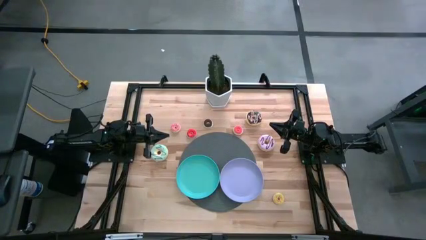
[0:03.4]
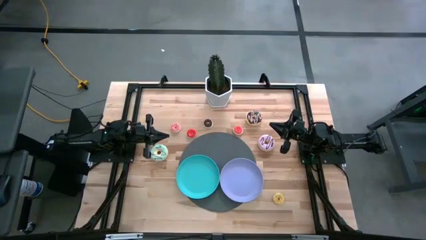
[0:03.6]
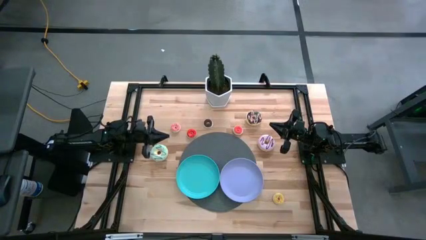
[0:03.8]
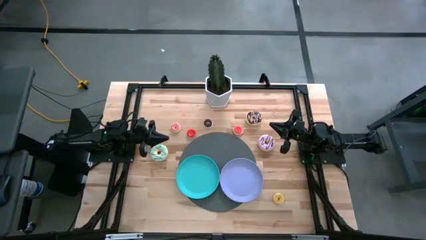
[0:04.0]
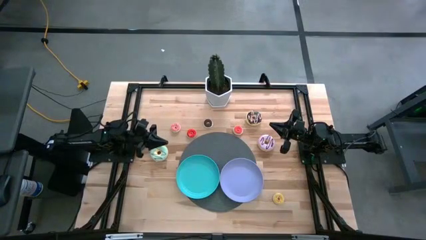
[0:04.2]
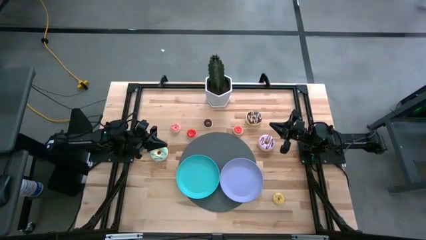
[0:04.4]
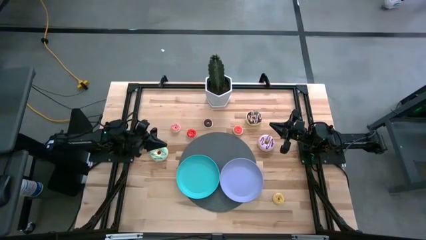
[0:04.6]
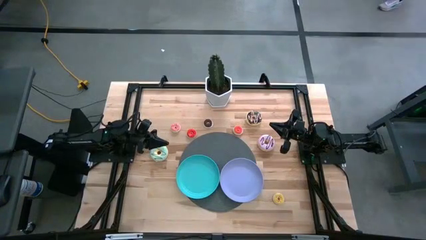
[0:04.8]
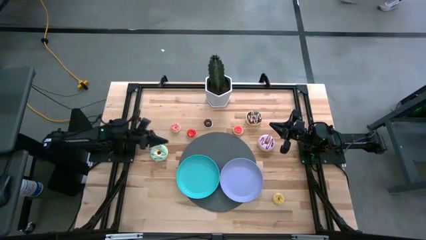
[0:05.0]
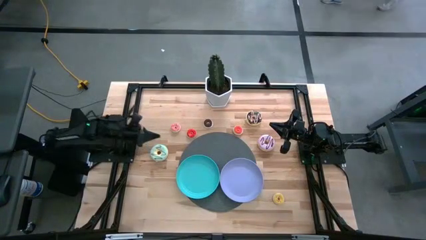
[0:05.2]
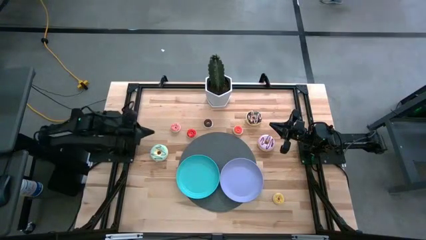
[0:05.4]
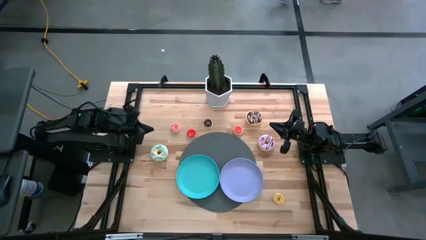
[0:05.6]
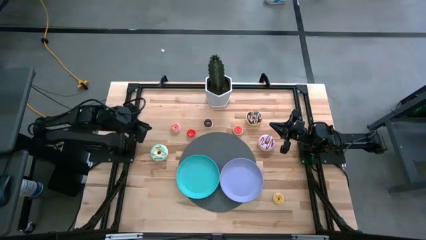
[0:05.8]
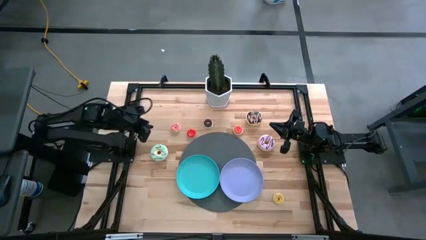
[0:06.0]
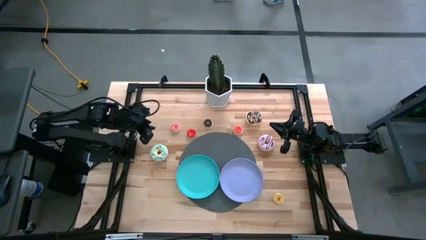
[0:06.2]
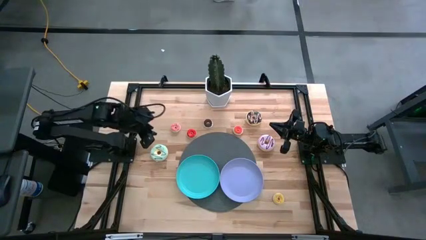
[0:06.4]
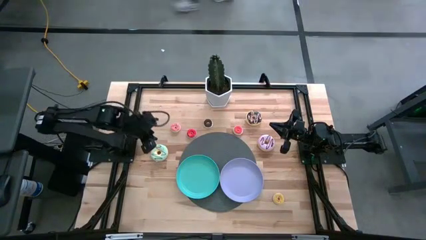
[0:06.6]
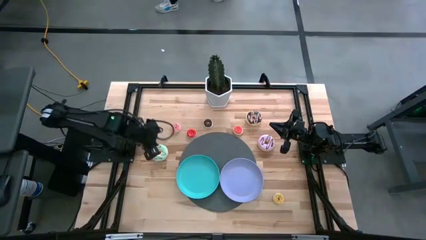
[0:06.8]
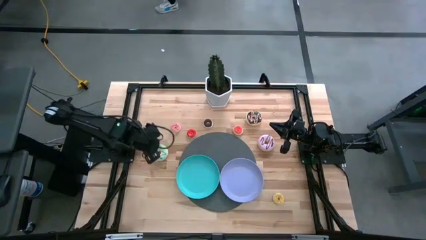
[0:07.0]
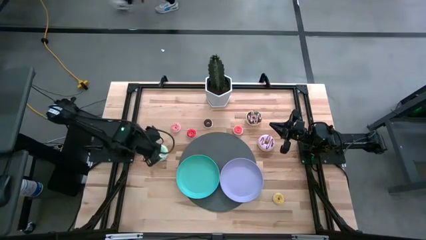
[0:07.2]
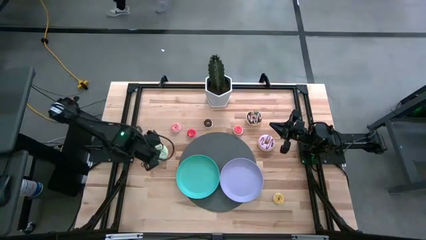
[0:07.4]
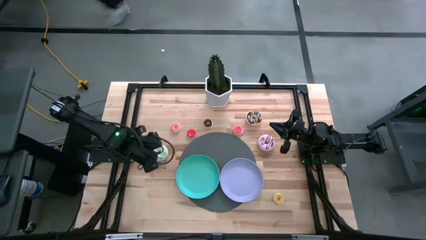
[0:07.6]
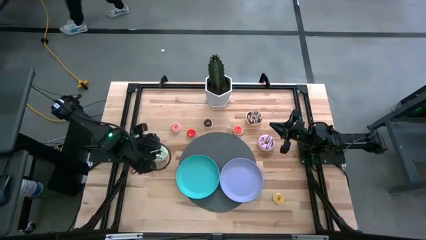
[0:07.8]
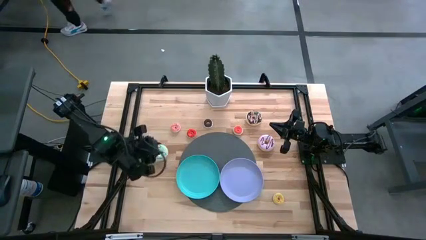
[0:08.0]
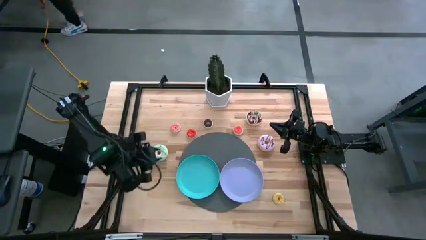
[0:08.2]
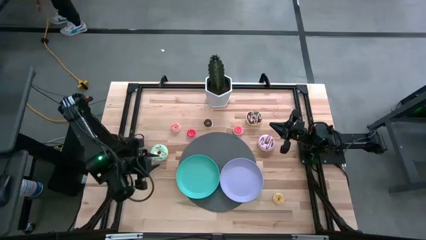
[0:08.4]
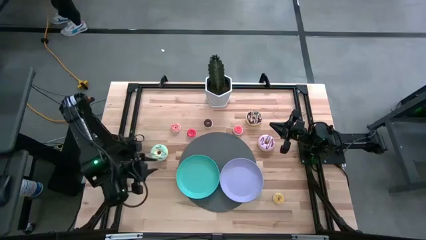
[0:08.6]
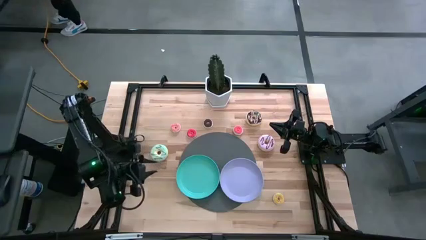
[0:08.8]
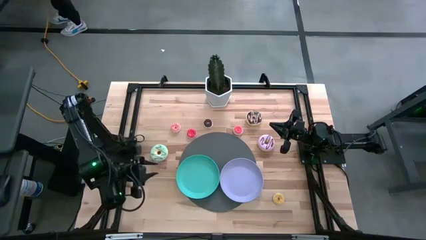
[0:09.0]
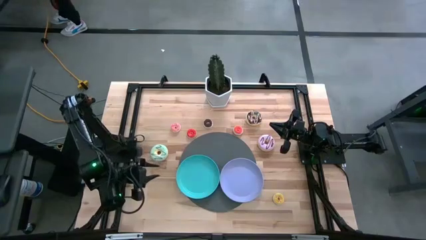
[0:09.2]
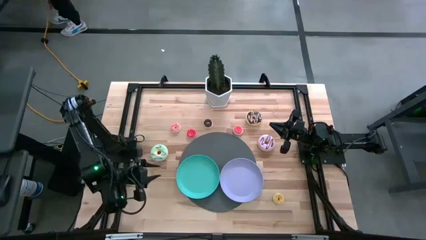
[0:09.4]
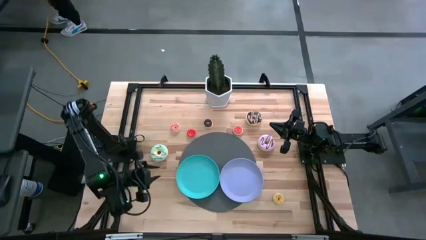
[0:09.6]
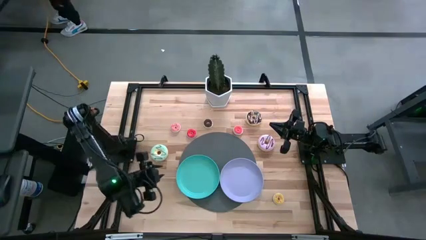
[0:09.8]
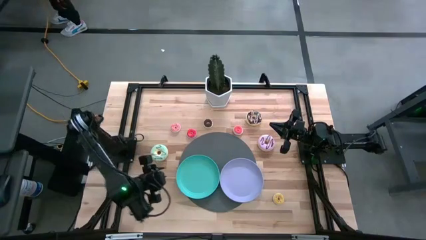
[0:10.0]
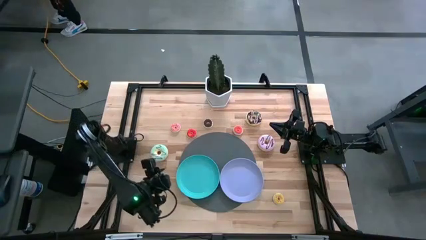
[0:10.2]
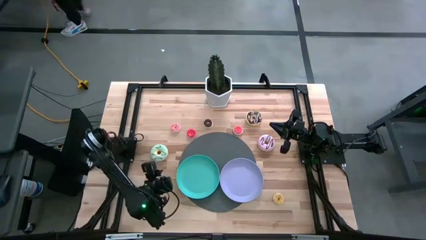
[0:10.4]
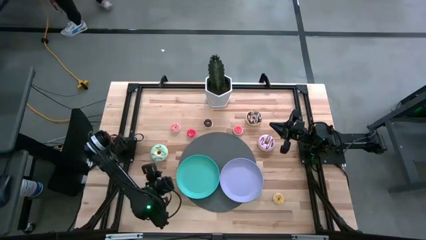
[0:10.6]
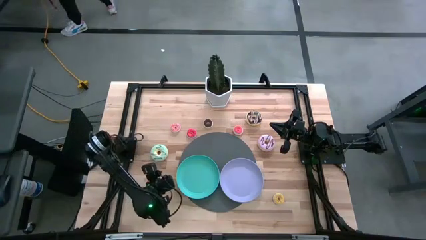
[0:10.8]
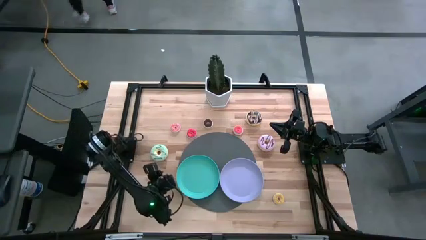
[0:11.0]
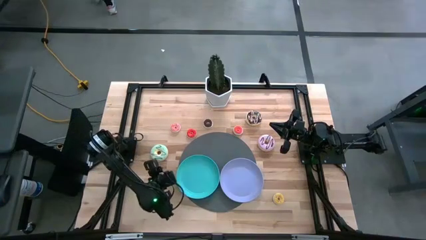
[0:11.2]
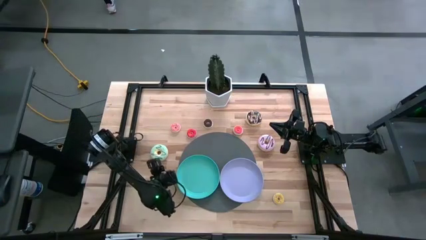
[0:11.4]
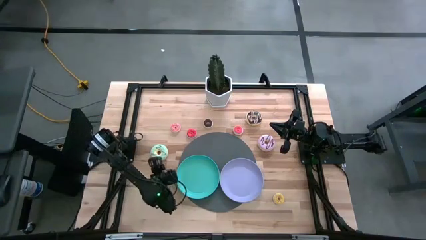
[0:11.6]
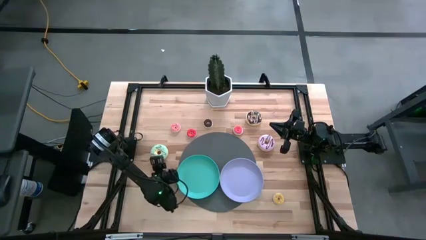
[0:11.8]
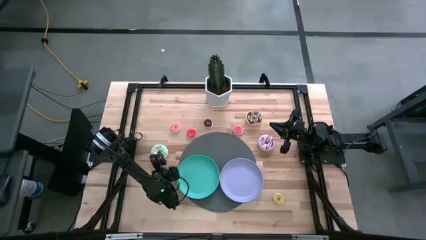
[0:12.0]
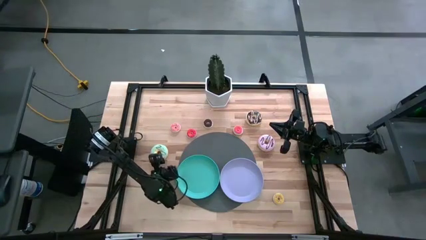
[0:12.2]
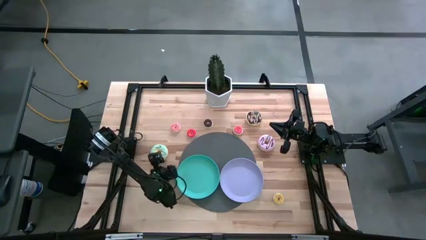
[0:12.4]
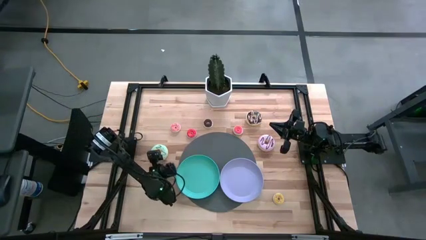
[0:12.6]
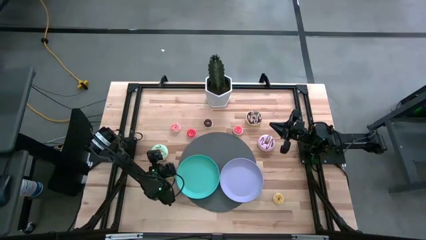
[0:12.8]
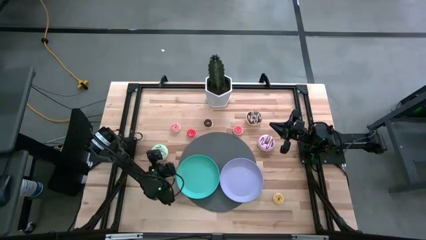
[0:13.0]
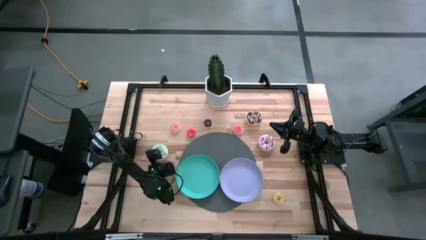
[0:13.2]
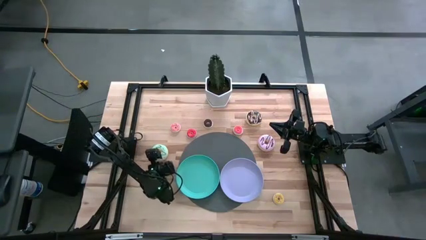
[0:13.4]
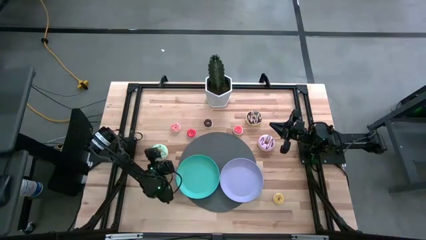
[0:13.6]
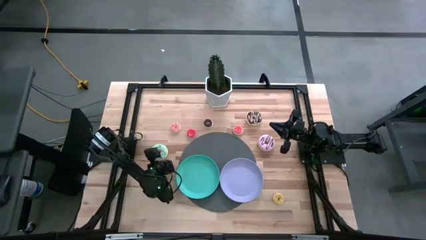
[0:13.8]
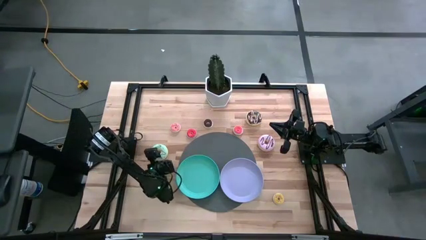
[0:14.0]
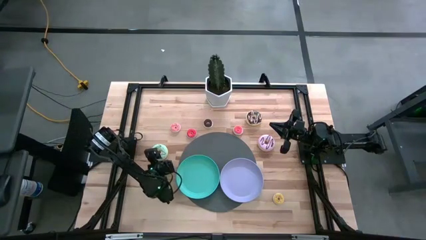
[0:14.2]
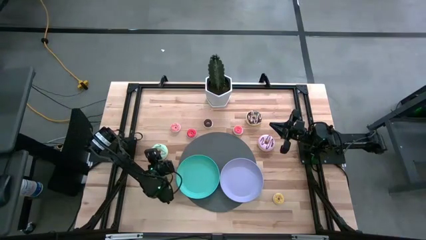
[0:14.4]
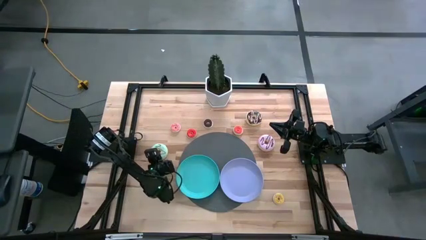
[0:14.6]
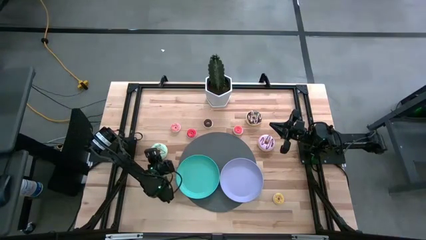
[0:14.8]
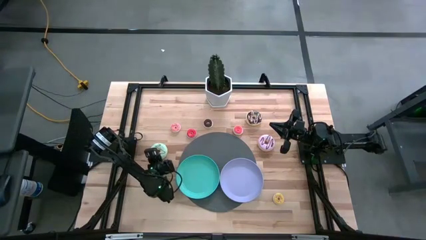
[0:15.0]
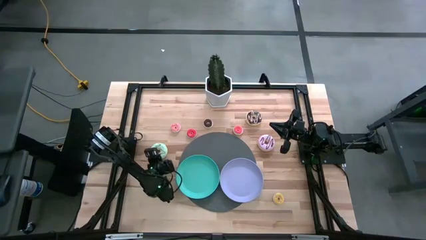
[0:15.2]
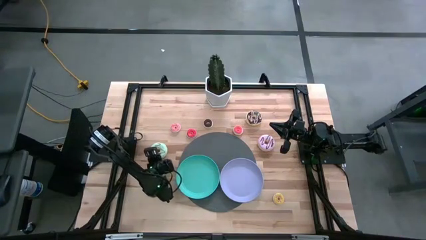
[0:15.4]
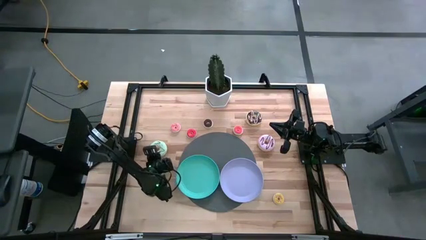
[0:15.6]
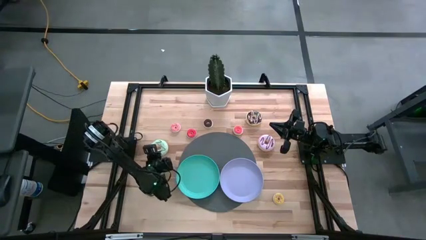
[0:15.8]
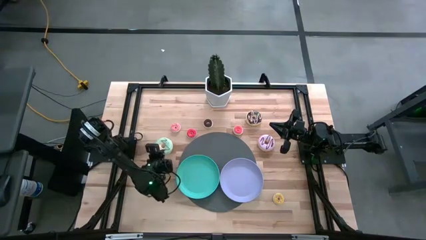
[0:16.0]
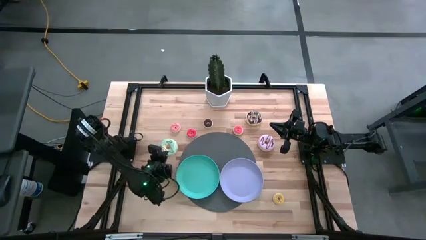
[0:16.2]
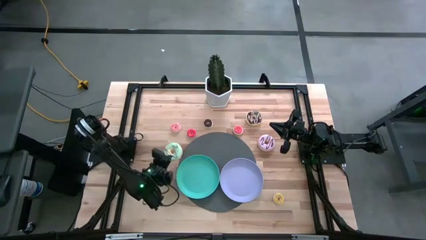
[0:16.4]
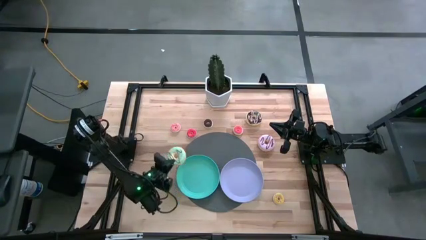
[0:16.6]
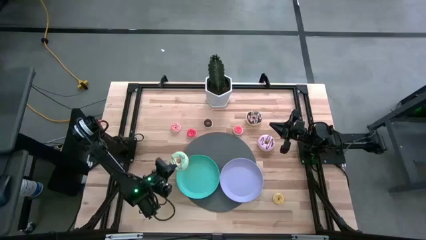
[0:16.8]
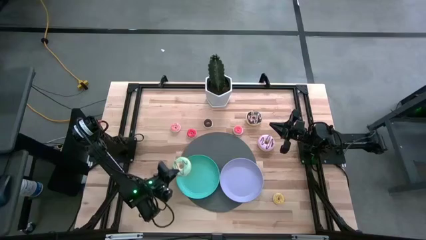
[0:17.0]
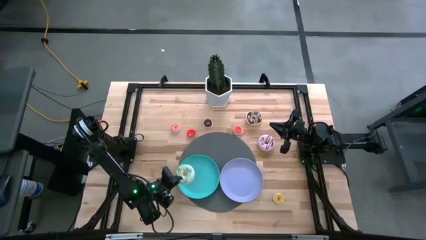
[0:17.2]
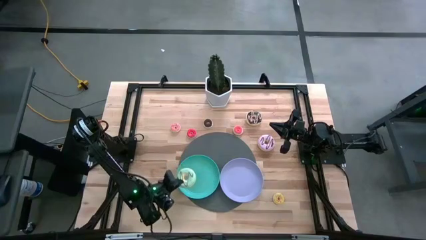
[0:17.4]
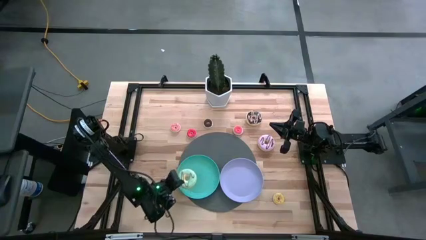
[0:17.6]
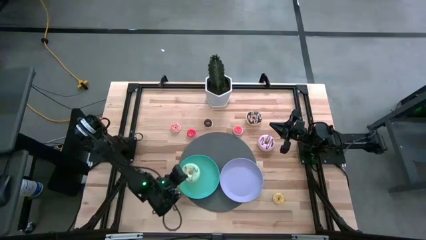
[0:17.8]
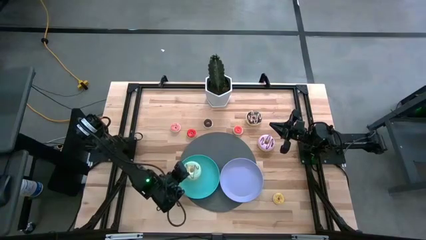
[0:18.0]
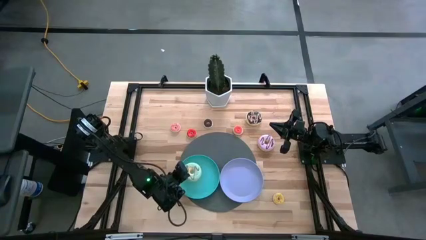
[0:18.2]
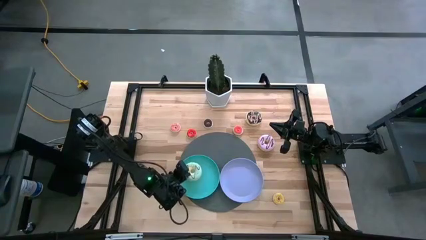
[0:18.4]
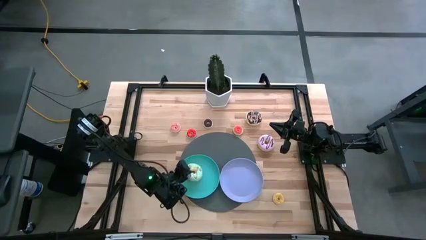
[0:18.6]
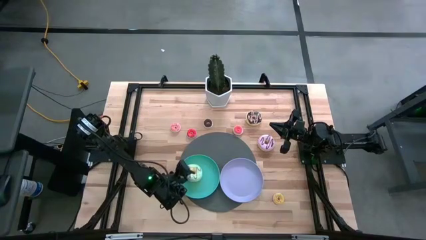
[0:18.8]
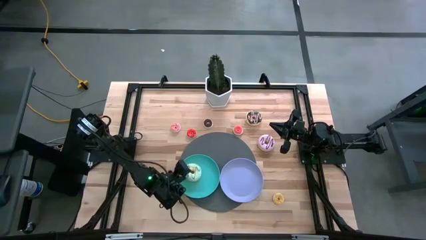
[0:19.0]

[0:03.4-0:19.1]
Task: Pick & Place donuts
Put the big light blue donut on the green plate
